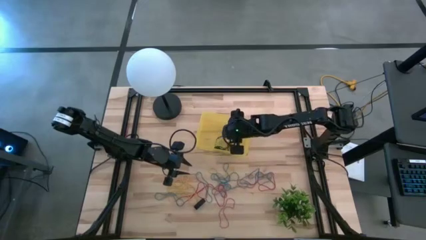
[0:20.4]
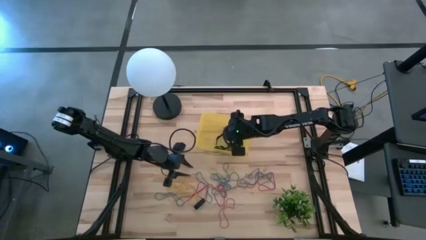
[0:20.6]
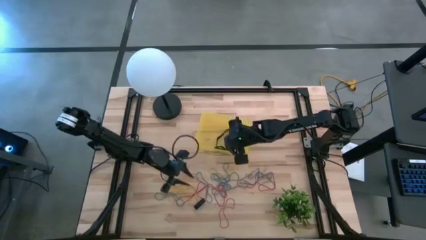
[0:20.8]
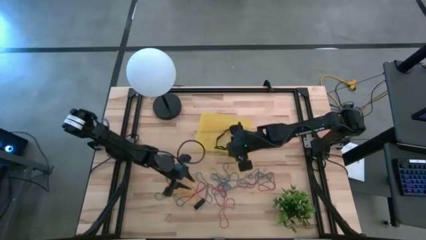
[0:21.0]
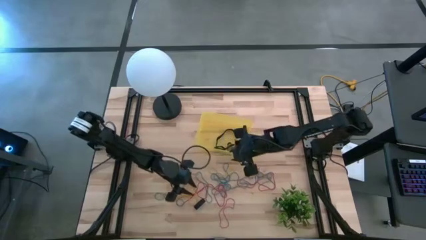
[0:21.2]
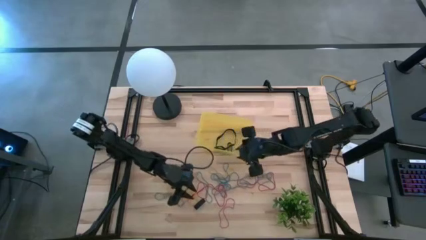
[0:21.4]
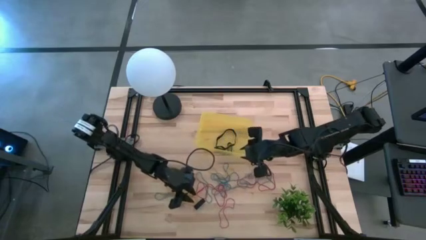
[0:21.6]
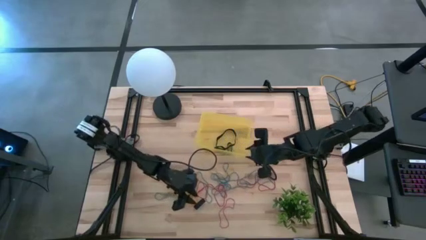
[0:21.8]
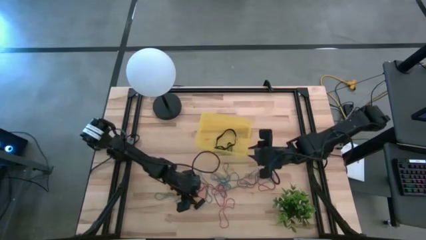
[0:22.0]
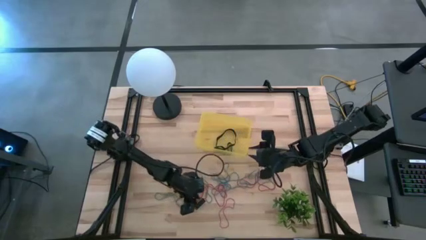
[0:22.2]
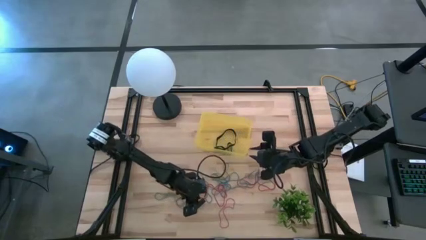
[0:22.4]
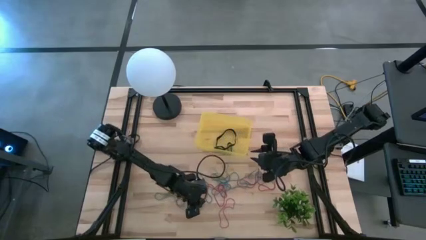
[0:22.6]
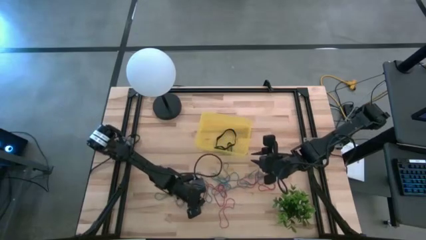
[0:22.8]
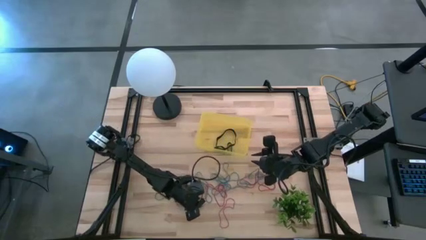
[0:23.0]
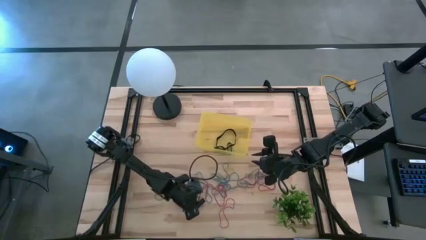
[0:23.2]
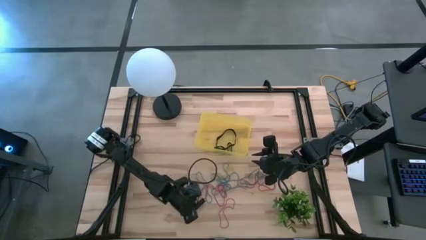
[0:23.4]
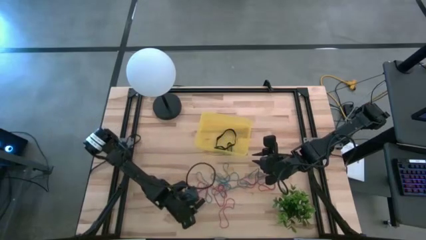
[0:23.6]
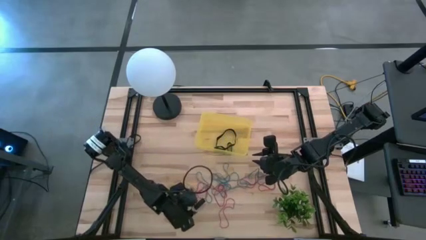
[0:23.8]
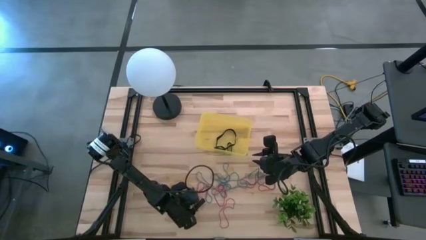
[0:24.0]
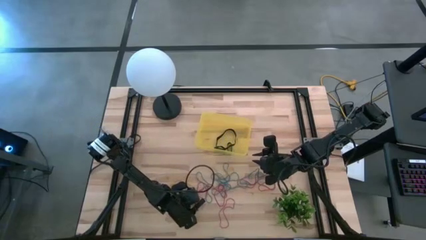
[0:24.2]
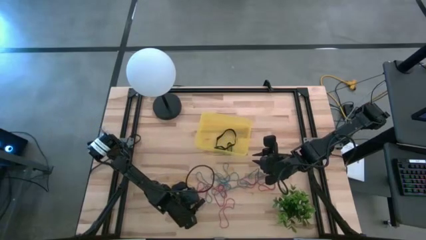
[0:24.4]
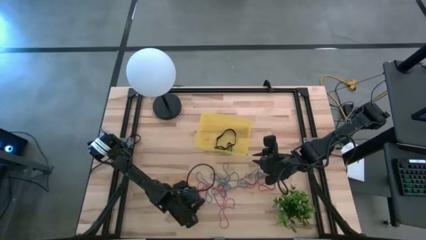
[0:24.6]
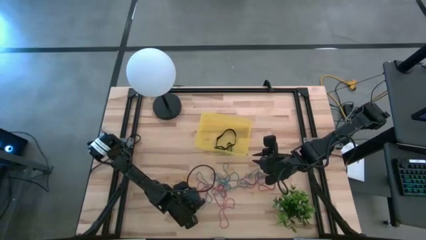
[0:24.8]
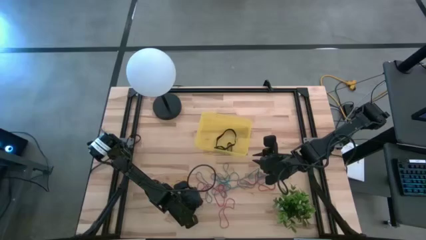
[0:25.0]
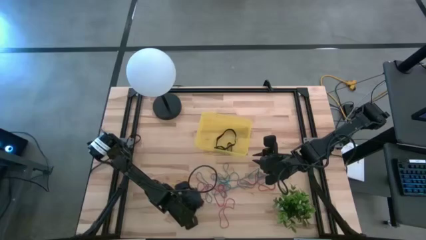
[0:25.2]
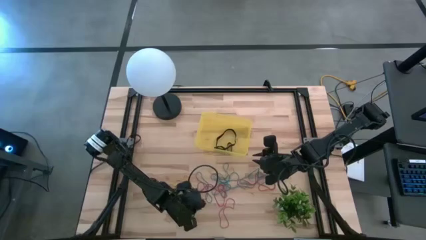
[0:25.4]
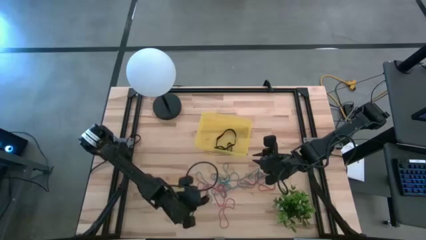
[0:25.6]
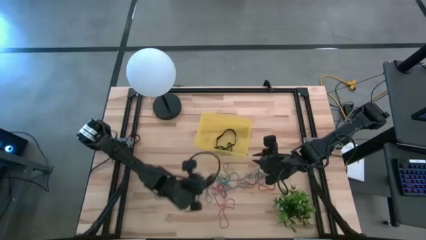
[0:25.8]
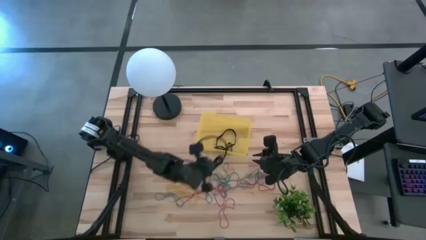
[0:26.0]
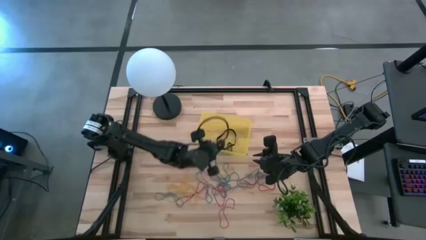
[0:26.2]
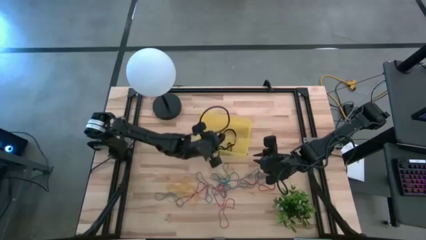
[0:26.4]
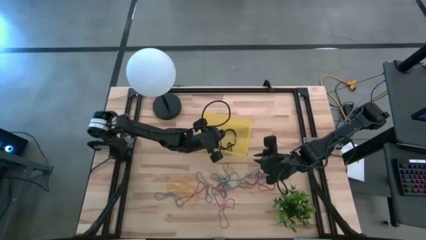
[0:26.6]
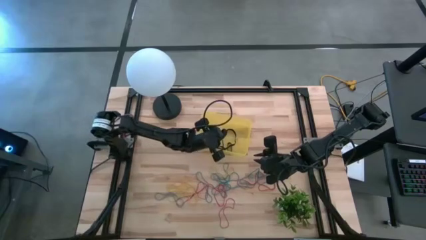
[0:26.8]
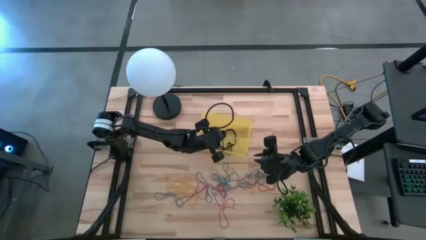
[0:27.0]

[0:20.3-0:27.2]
Task: Pick and place rubber bands into bin
Put the black rubber band into the yellow bin

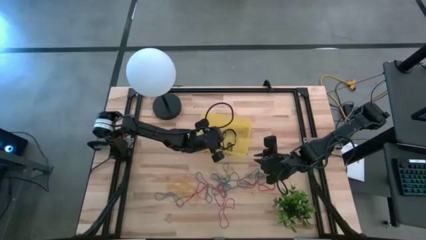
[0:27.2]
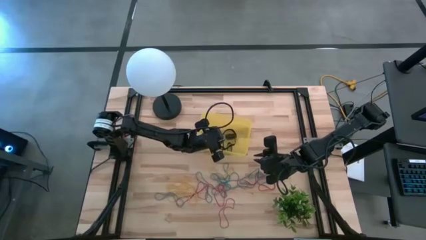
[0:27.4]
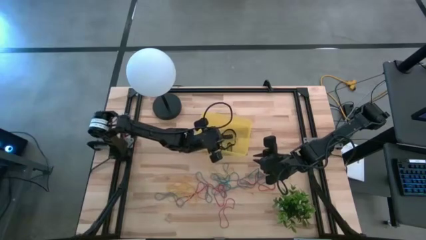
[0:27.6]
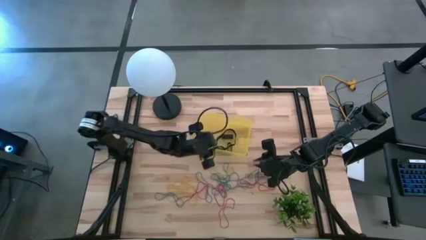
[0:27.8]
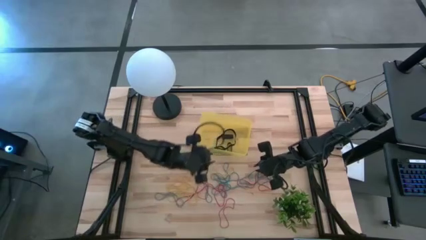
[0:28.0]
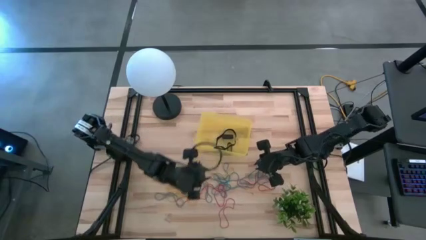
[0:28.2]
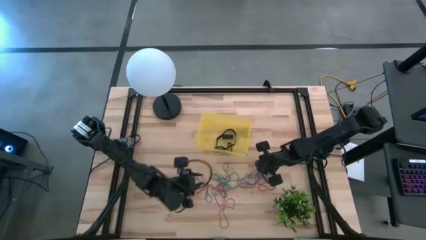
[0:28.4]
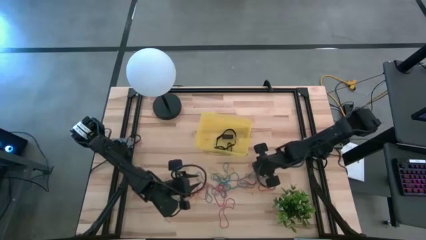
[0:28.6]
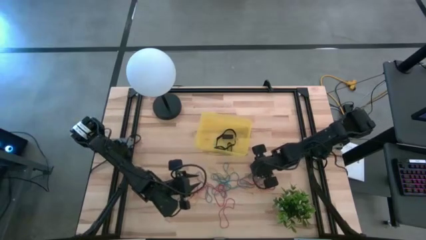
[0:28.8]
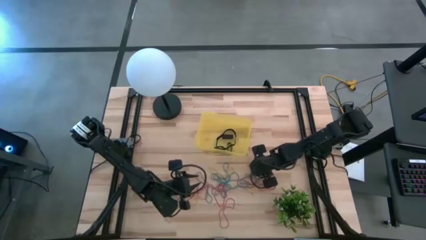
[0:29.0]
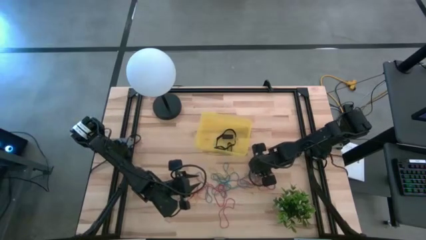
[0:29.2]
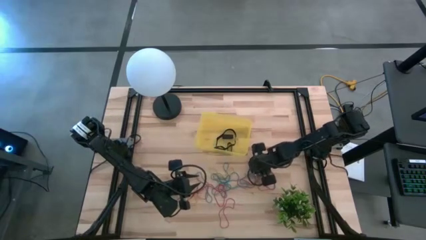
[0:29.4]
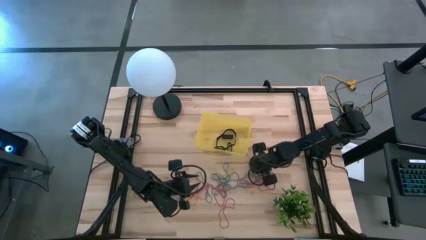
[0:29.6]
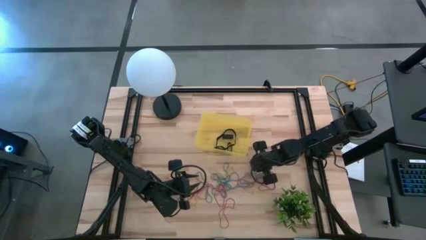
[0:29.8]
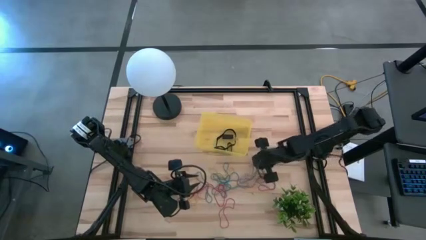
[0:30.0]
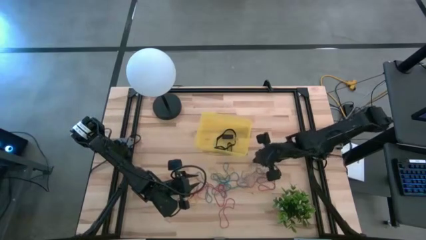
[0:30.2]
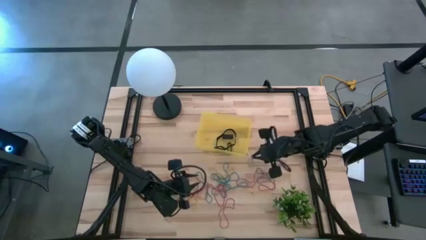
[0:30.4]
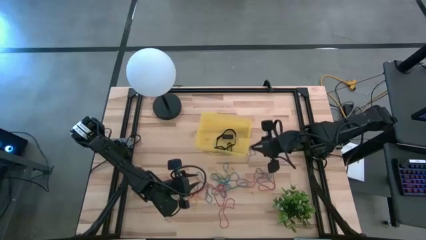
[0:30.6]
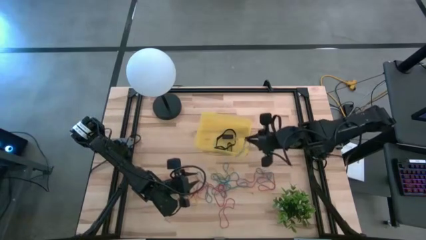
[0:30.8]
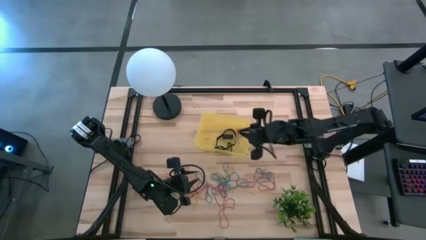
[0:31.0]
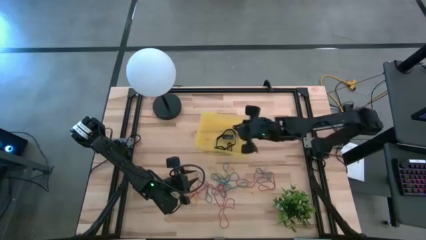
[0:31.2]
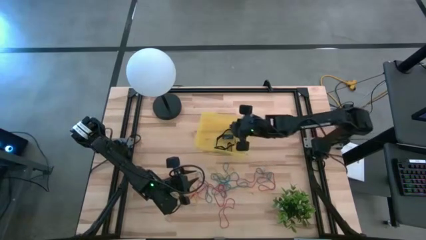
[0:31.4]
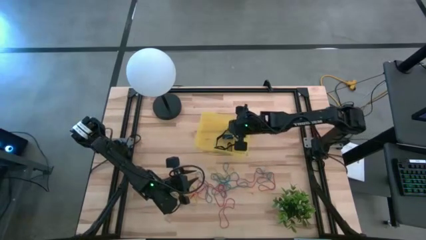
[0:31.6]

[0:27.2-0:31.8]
Put the blue rubber band into the yellow bin

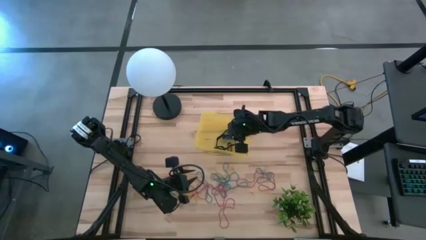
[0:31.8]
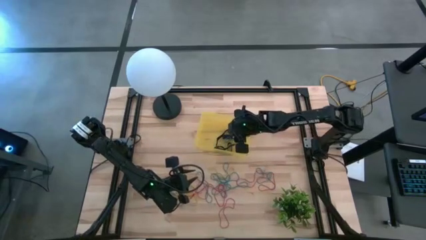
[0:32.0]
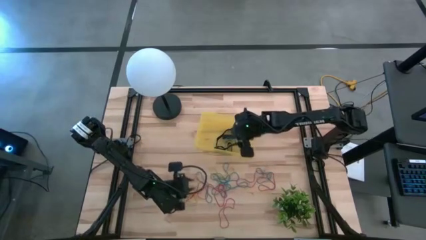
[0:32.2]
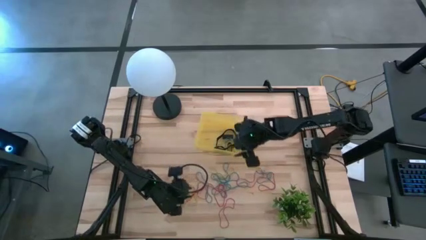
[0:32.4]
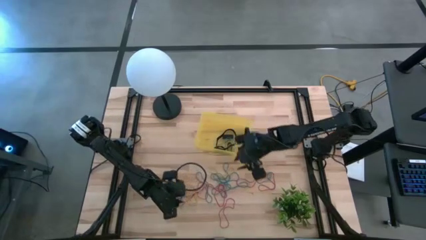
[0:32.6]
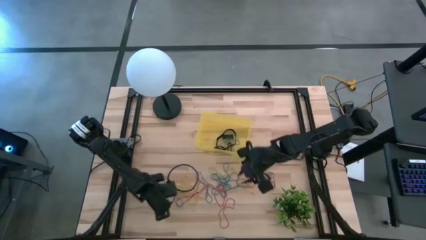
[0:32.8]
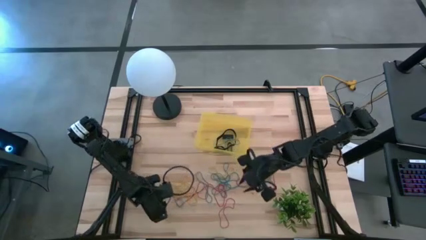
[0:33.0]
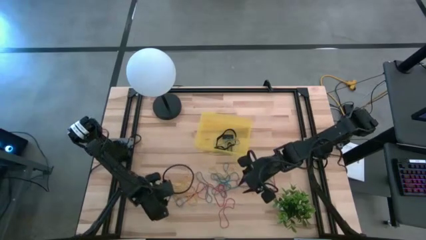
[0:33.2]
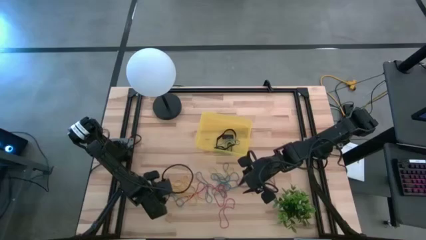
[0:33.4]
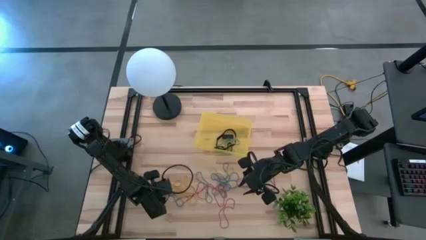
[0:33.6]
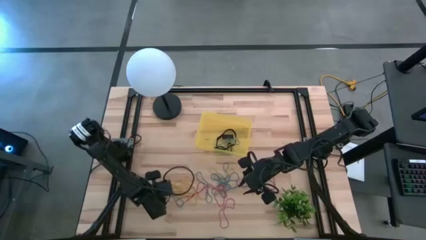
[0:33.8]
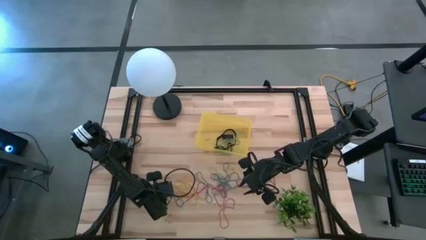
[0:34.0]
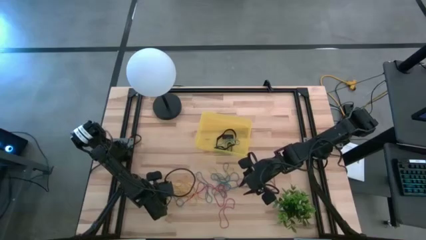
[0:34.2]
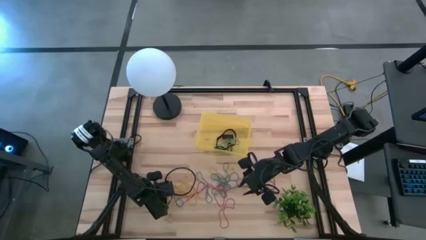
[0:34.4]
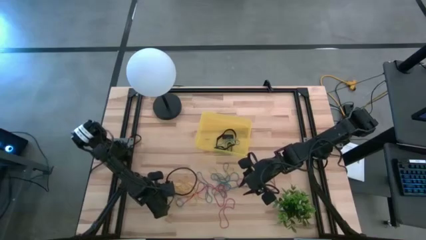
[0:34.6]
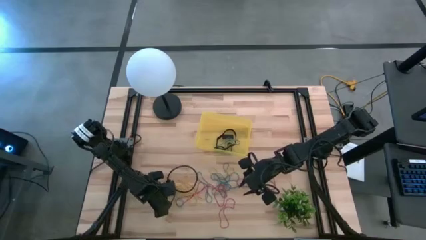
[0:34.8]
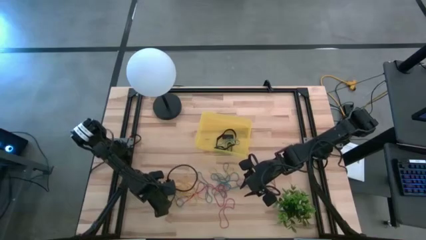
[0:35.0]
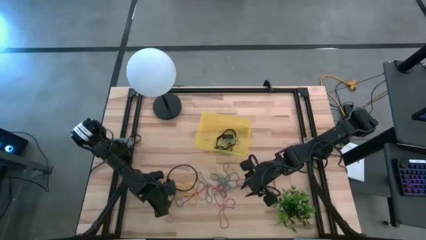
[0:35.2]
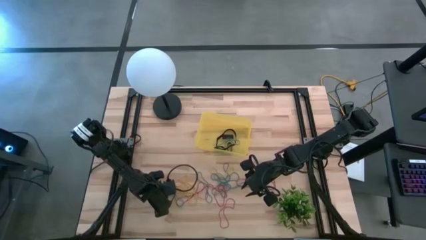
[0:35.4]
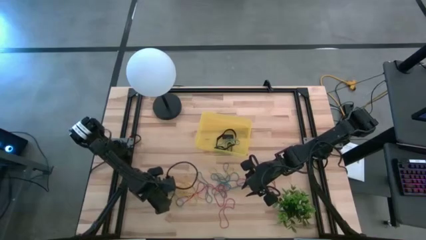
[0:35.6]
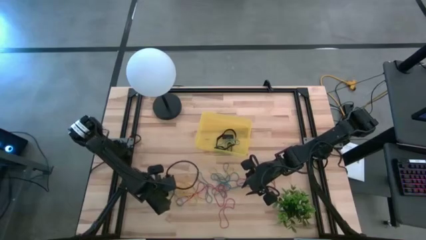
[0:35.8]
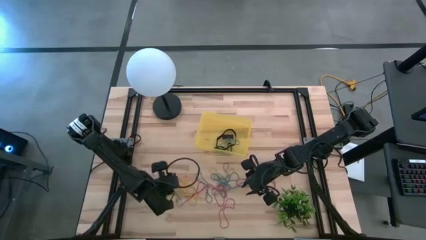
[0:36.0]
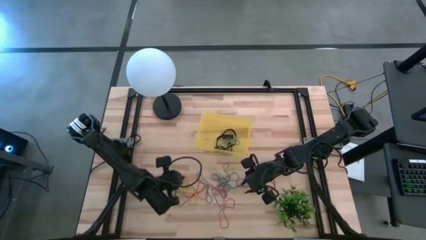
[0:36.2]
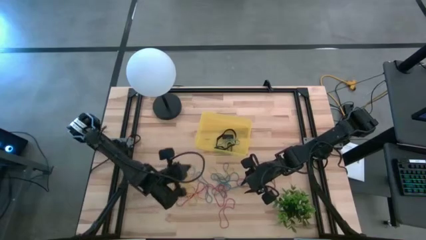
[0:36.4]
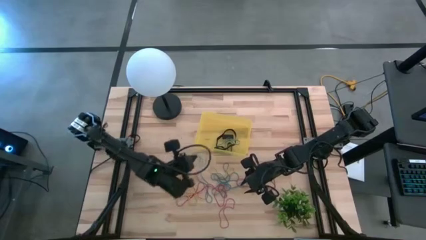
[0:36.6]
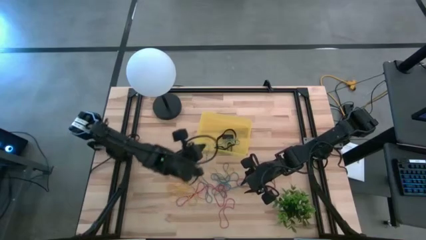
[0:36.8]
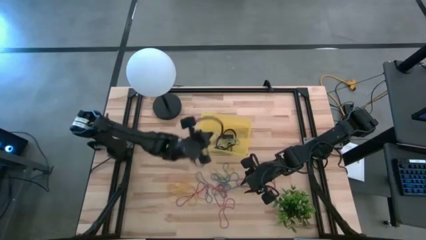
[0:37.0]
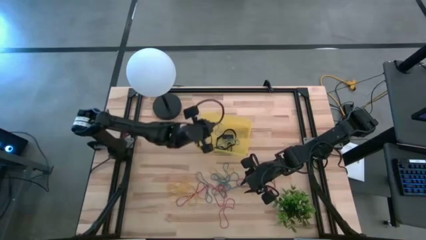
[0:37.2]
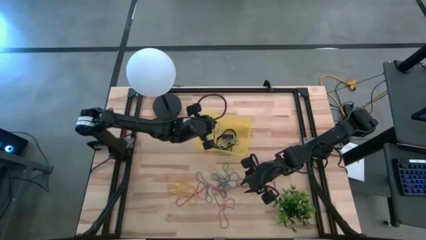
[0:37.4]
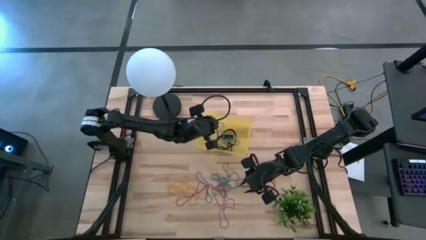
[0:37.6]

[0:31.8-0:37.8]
Put the blue rubber band into the yellow bin
